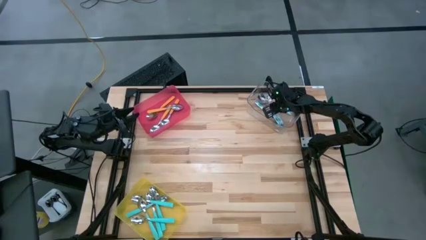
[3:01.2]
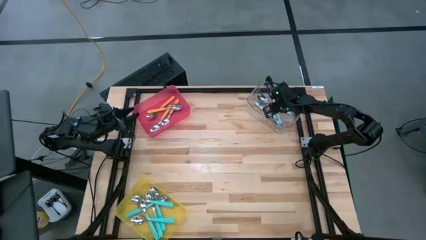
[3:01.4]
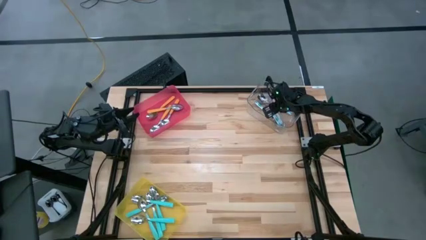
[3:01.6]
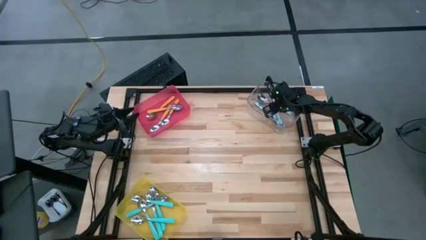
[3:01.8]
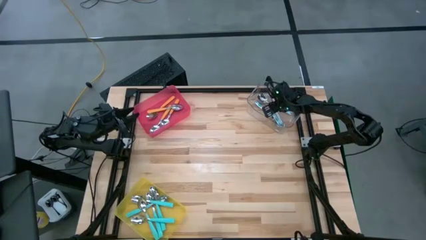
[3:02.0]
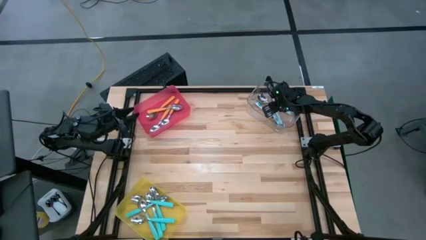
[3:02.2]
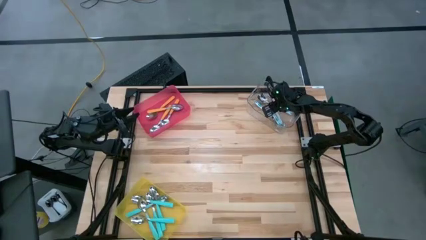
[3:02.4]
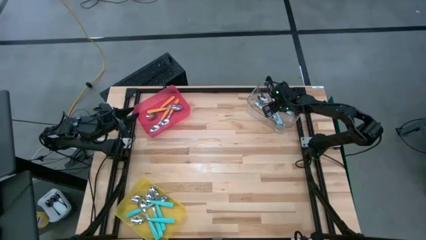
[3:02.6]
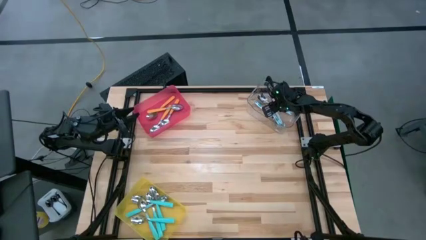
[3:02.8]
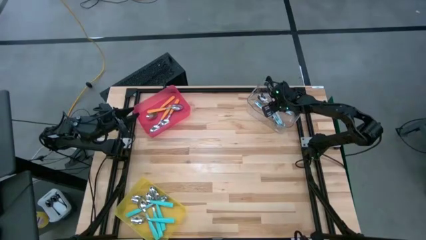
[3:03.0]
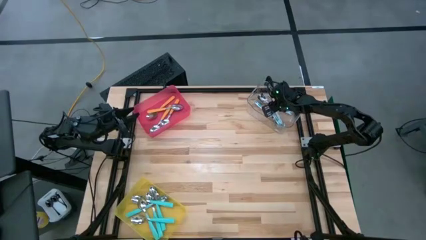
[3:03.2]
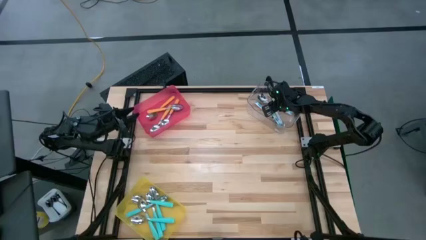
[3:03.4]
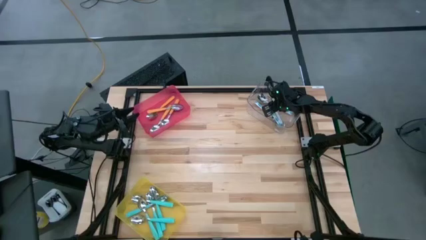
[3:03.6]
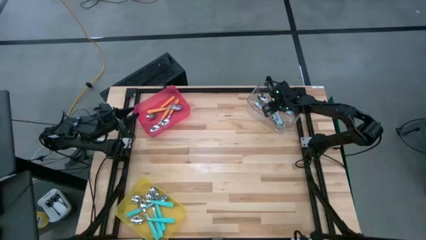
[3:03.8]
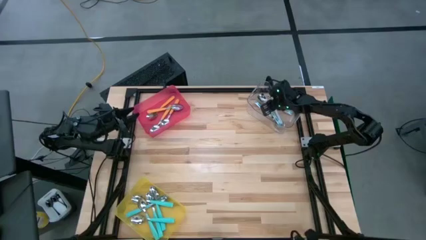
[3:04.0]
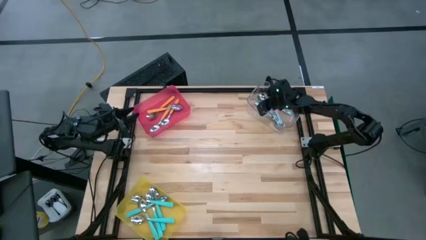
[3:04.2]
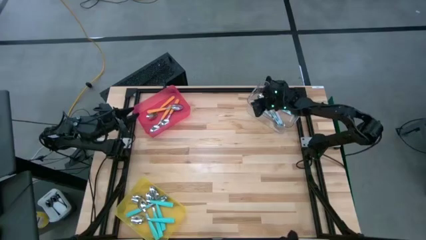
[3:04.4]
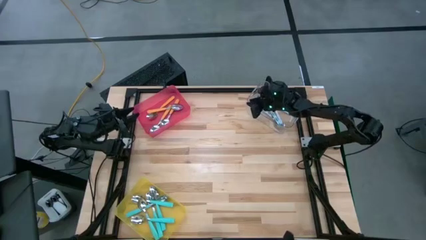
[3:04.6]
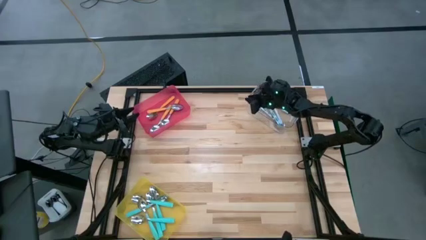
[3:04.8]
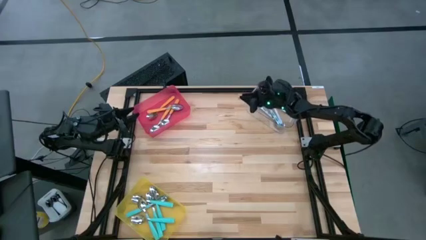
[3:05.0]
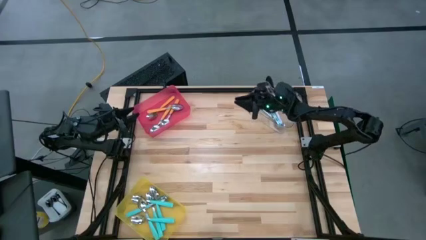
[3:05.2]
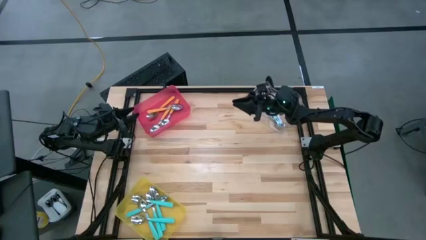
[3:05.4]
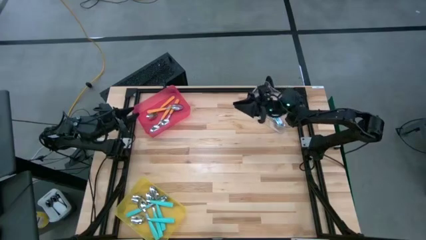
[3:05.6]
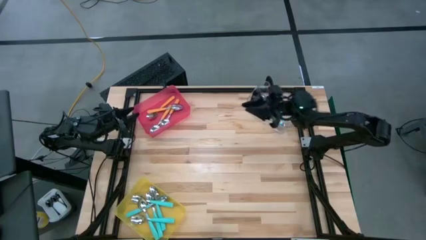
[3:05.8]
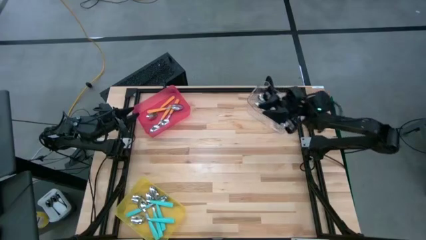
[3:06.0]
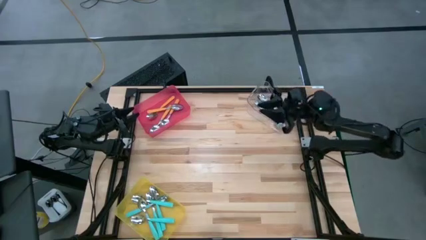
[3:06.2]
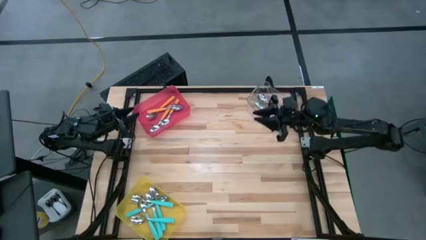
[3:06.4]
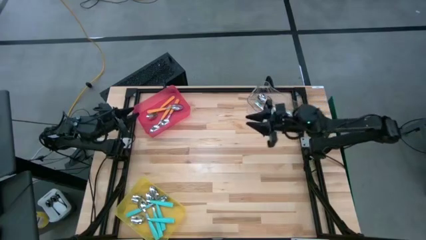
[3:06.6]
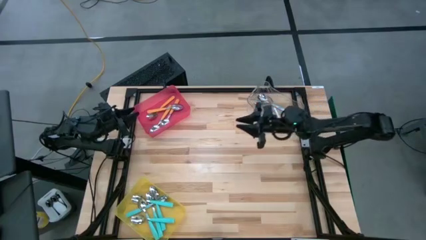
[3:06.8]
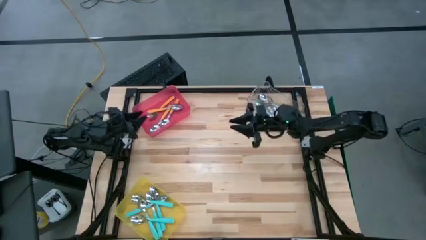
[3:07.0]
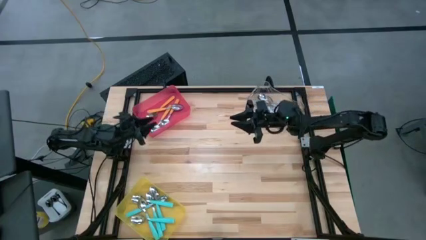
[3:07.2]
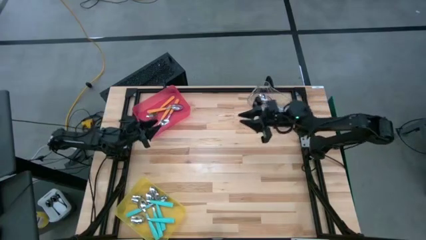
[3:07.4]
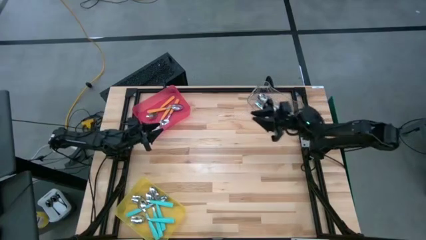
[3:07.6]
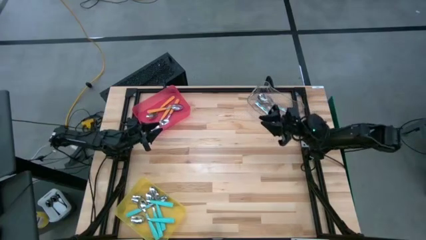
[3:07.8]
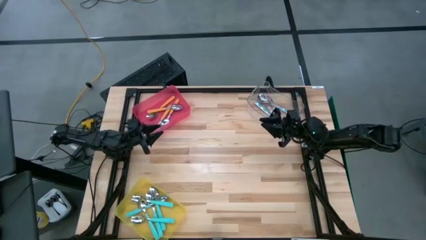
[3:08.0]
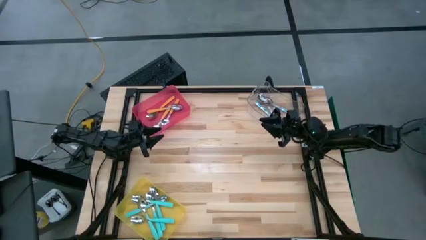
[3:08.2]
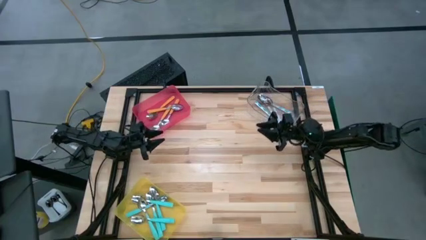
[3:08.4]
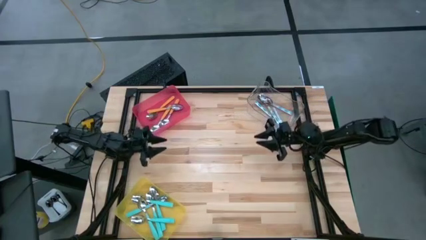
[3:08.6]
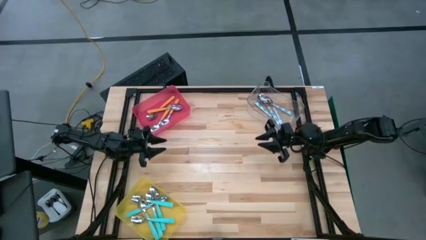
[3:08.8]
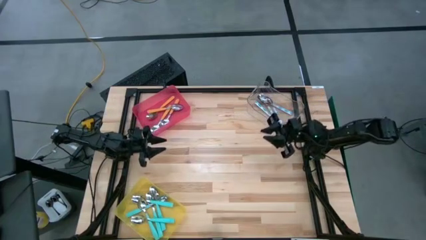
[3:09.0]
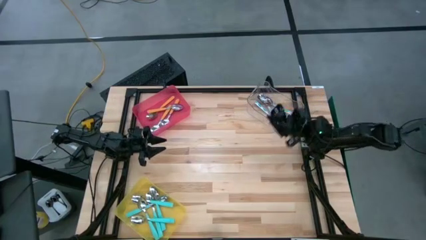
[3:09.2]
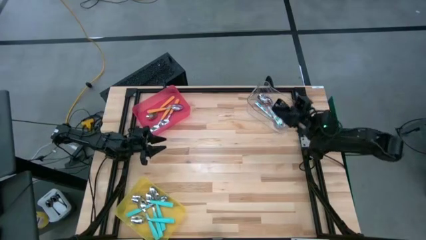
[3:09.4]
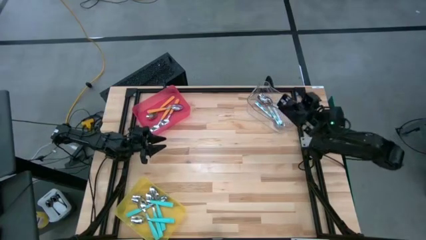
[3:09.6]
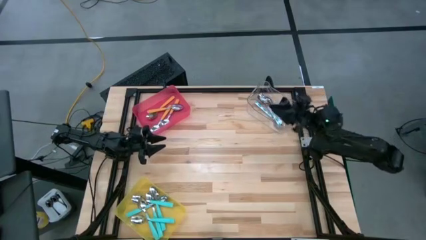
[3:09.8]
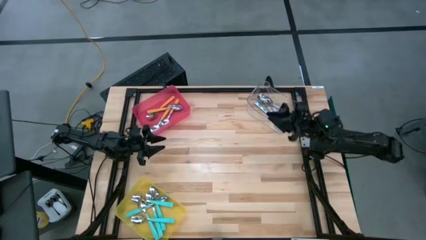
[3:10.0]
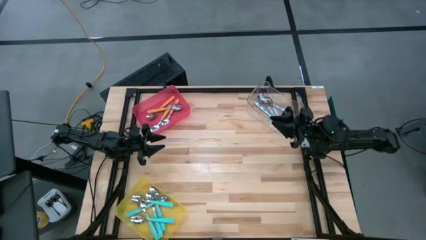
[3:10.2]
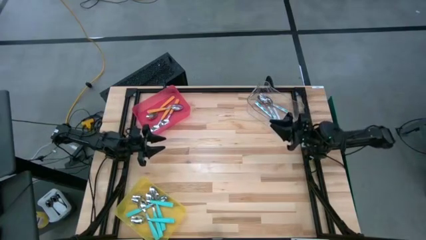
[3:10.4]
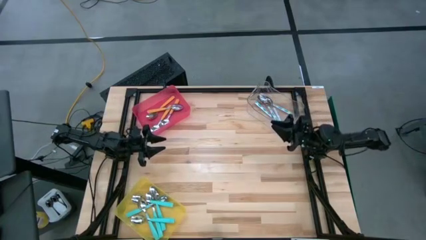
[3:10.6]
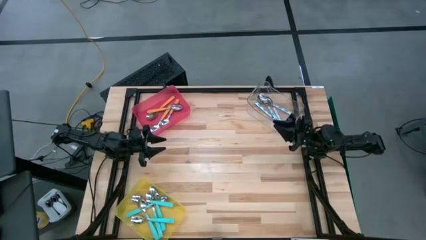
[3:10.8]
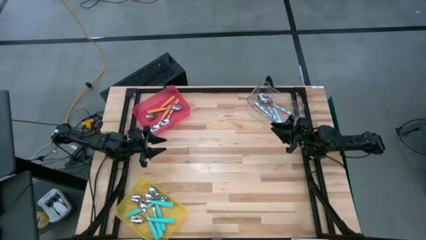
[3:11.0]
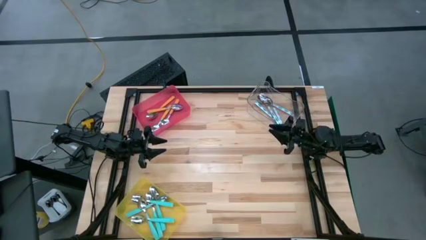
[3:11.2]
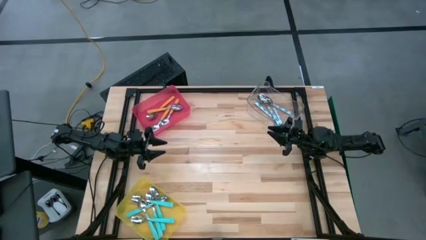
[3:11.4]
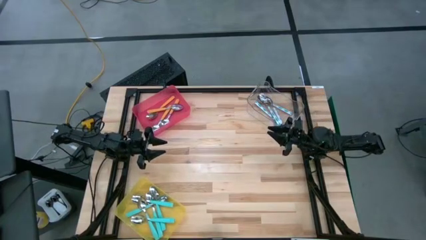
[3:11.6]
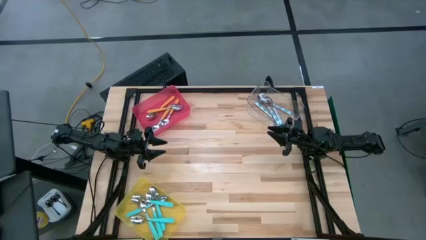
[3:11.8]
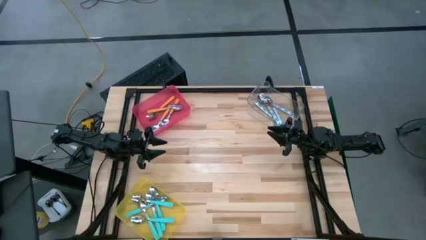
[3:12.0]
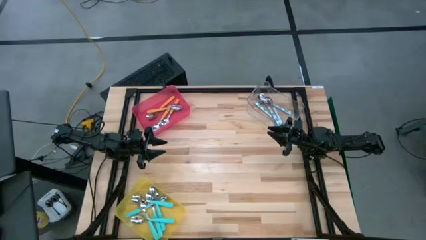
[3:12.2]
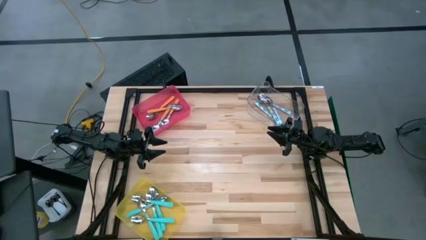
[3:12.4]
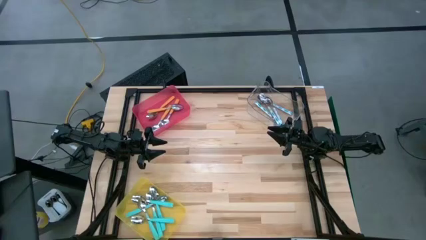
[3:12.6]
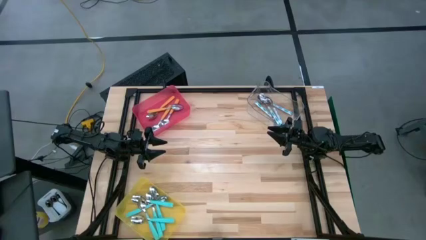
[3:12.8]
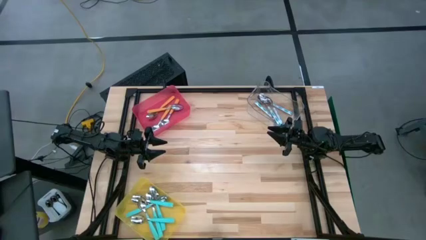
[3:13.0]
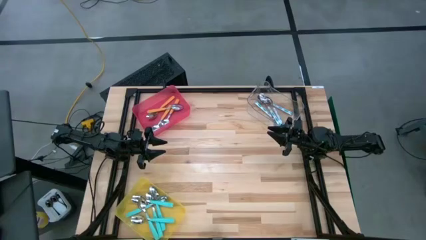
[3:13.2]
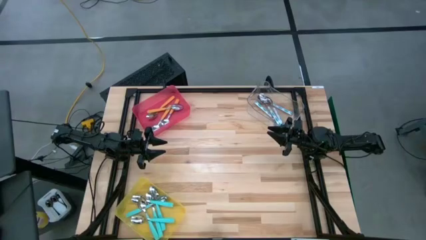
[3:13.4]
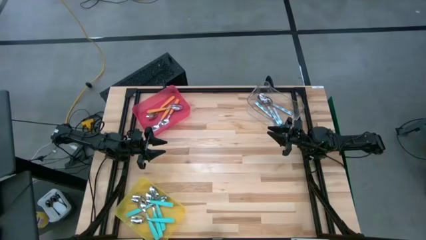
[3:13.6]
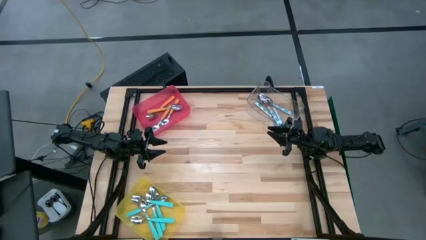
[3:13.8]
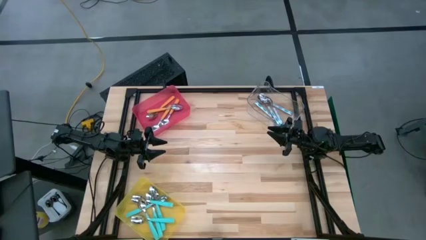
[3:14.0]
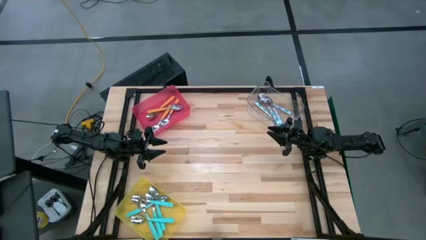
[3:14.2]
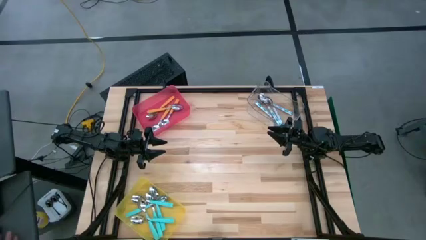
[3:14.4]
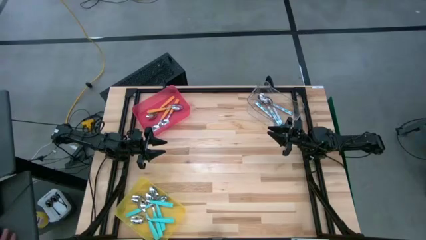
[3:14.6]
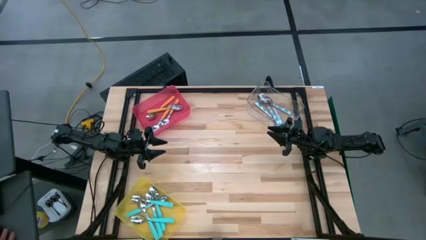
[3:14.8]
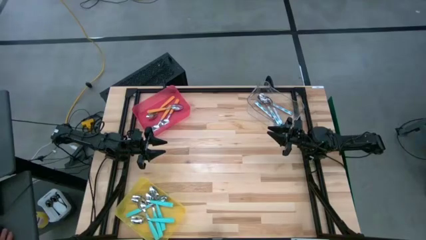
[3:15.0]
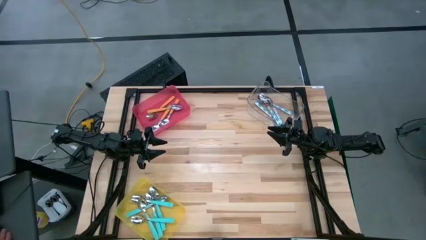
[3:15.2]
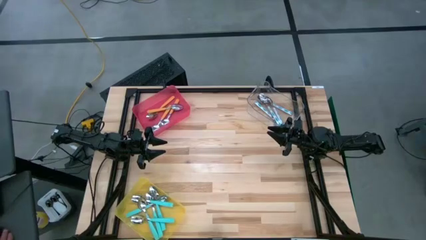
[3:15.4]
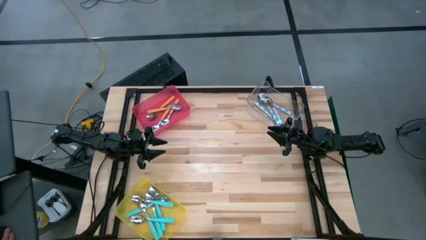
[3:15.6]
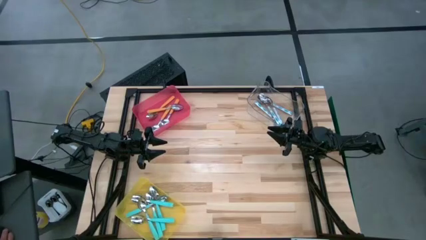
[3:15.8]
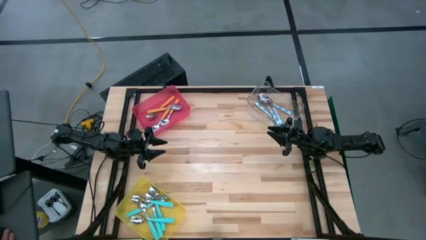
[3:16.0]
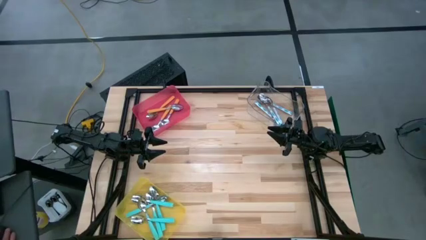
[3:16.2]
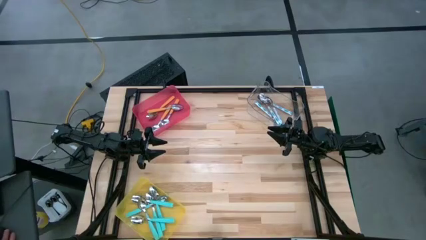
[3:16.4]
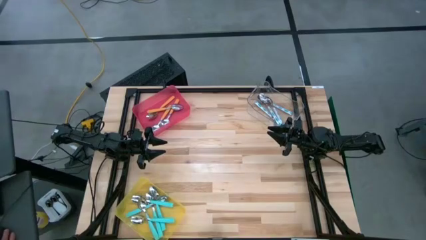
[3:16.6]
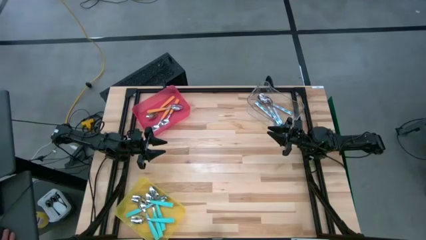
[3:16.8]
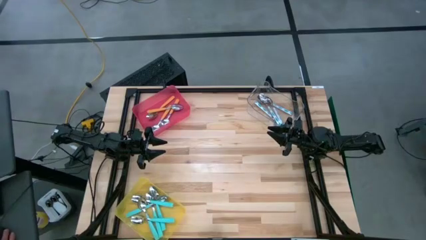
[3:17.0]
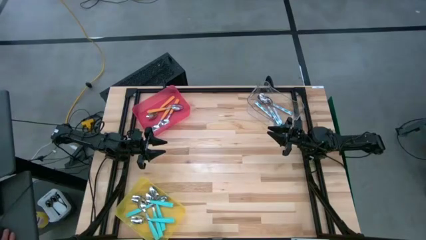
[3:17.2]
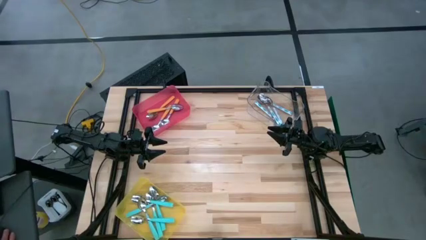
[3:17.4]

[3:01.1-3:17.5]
Task: Sort silverware by color (type)
Return to Home Position
